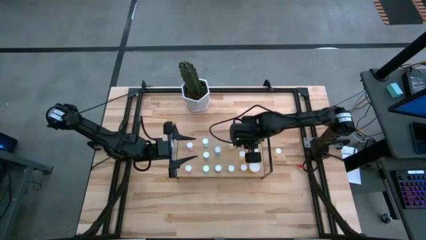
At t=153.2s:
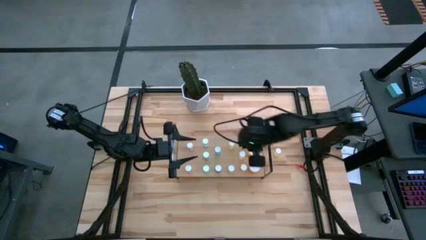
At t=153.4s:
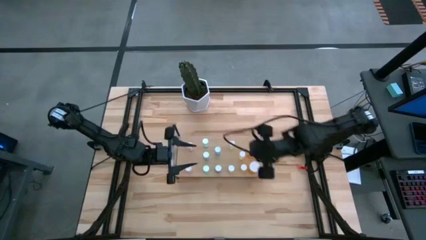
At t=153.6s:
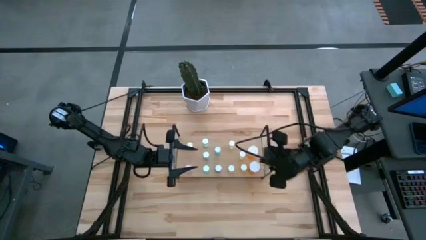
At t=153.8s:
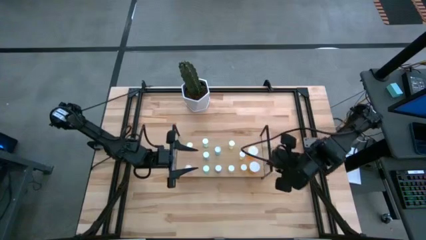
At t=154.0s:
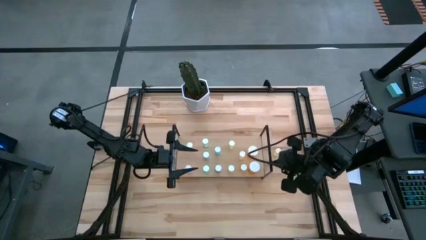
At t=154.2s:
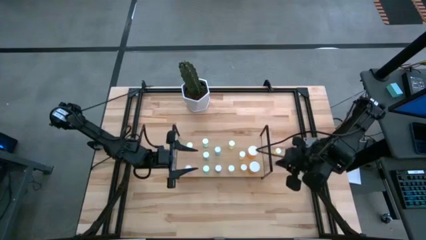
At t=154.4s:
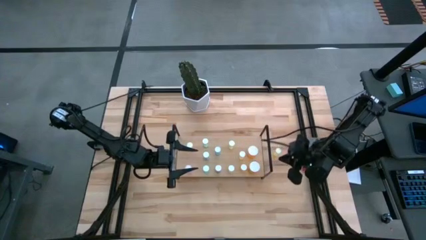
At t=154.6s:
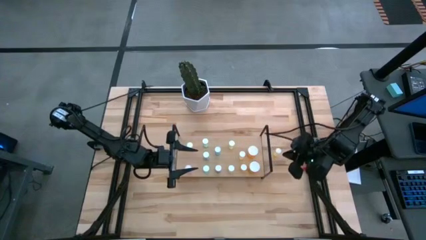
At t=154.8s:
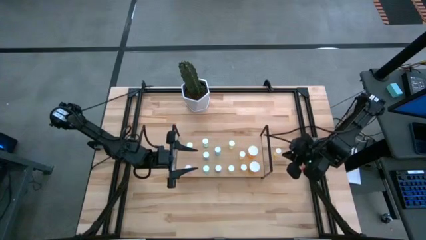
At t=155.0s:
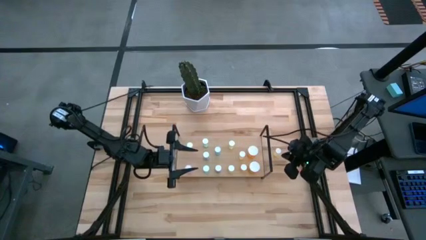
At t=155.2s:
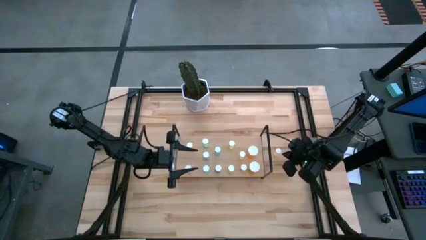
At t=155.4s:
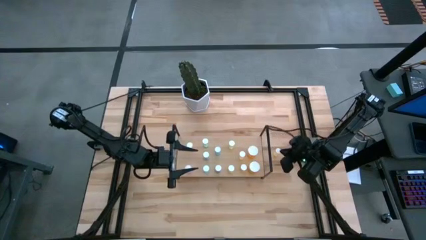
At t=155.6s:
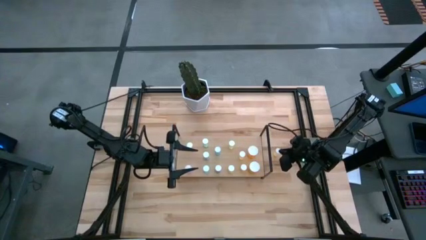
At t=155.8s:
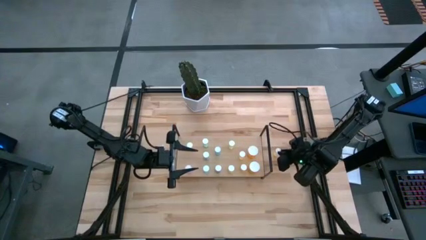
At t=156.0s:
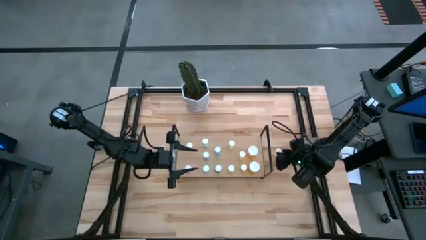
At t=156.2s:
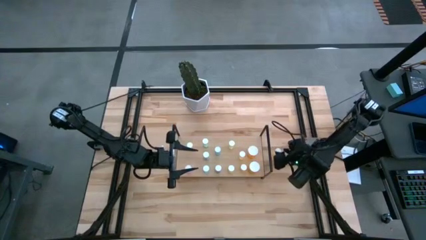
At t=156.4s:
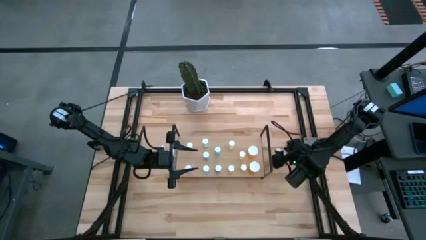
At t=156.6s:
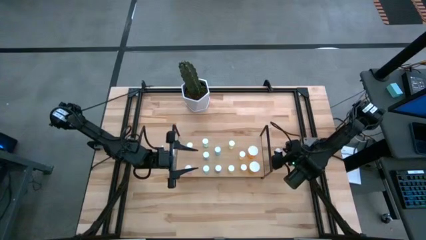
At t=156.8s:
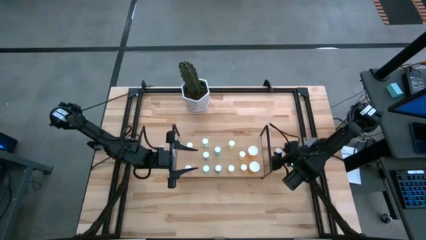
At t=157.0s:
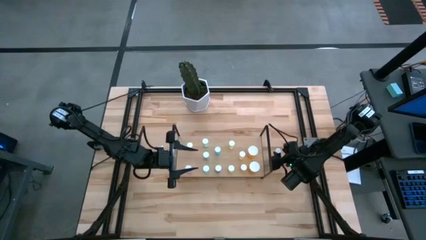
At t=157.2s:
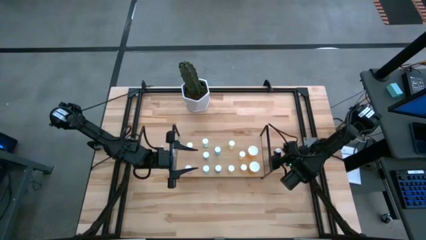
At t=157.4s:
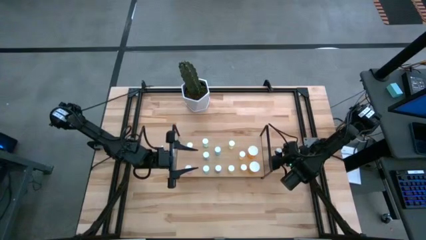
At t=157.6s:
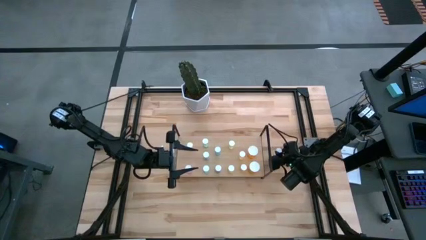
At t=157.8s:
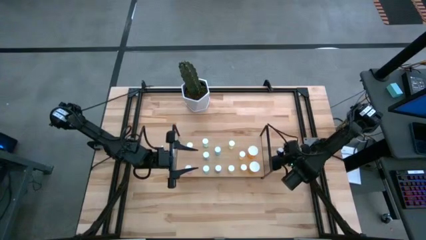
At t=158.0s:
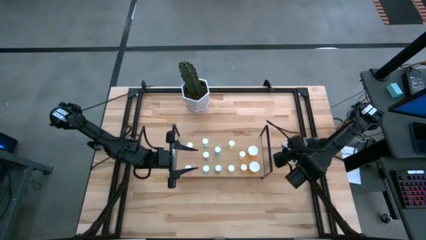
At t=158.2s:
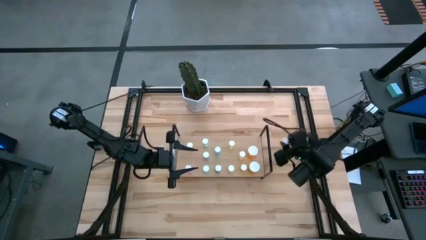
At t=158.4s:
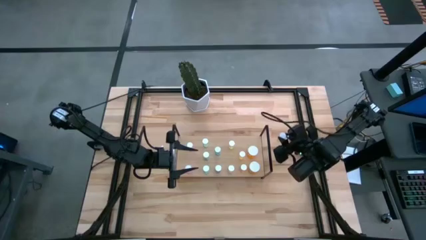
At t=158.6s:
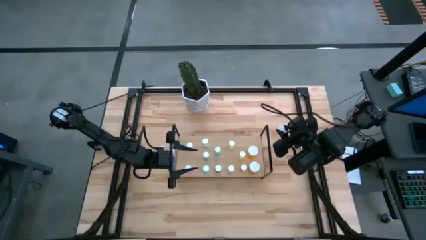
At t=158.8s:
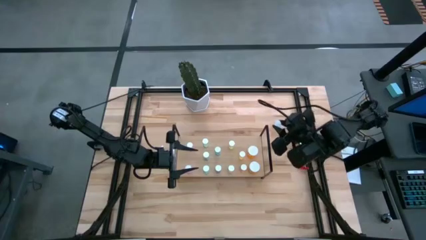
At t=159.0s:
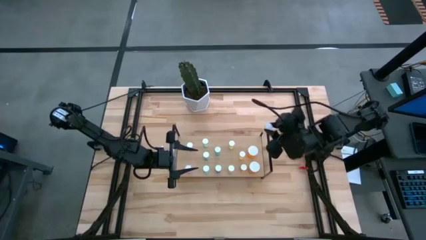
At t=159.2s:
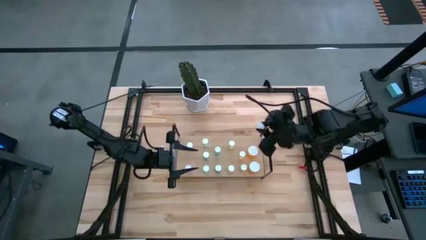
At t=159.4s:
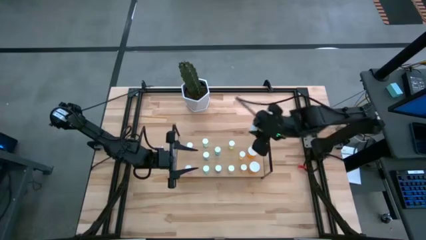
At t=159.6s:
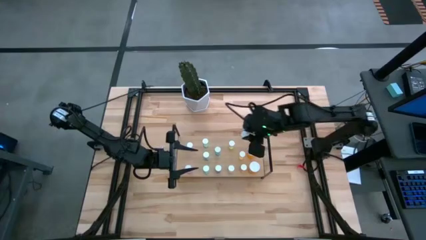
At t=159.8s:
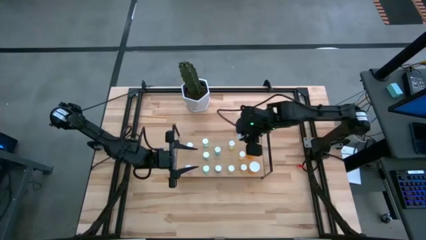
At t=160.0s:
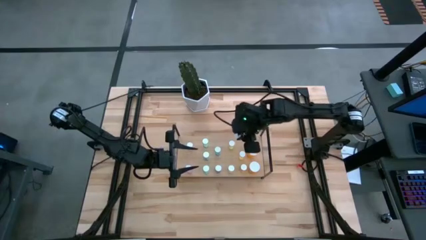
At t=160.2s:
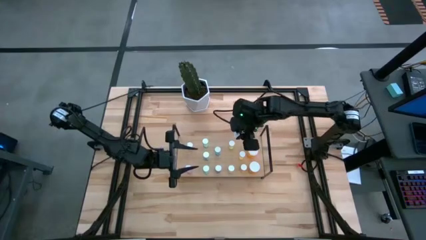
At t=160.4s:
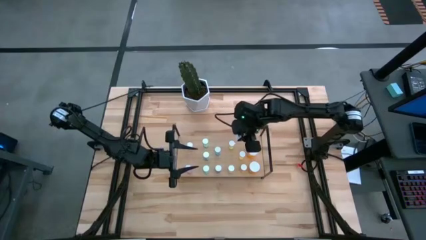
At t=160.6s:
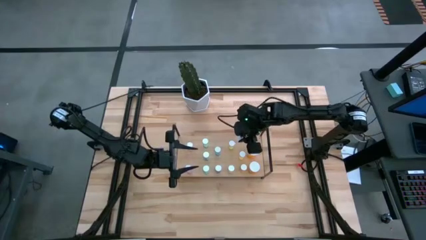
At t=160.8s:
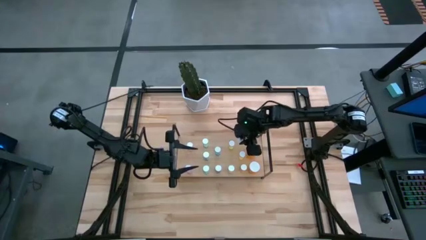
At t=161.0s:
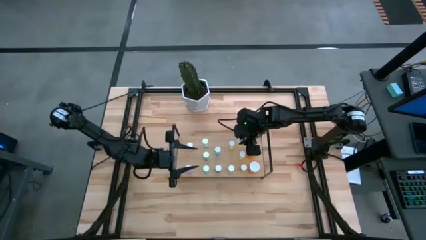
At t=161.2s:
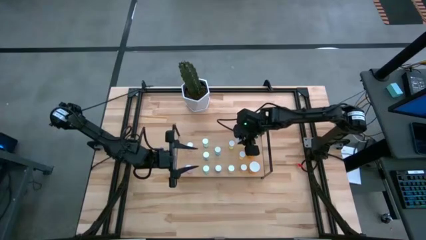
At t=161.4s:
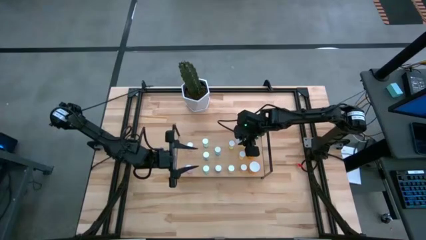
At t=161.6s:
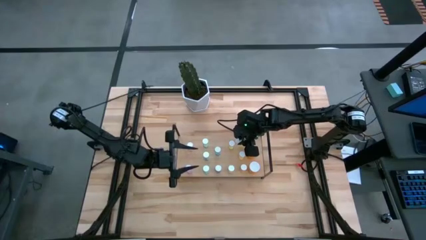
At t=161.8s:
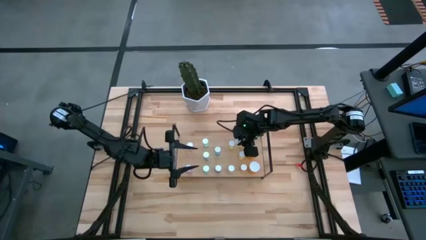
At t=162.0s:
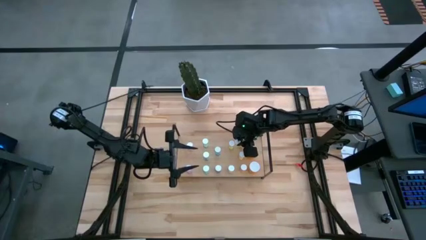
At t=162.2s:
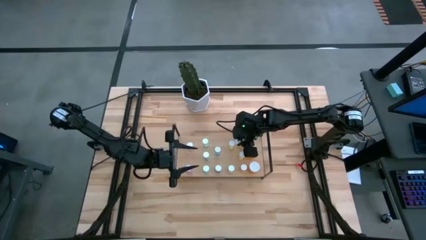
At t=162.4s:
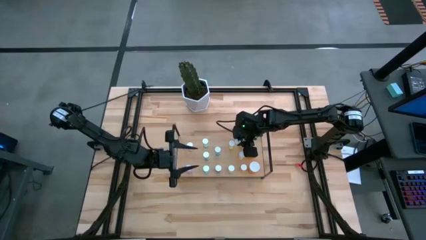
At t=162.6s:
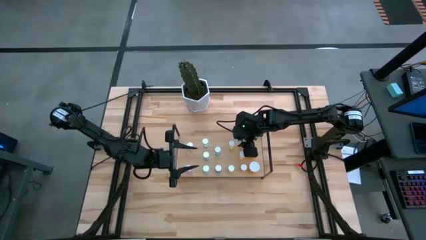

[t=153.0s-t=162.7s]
Task: Pick and place medicine bottles onto shelf by color
Put the yellow pill bottle on the shelf aligned with the other yellow pill bottles

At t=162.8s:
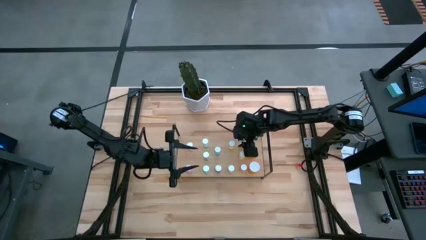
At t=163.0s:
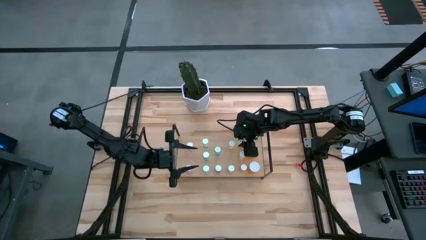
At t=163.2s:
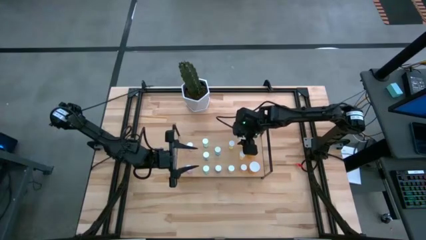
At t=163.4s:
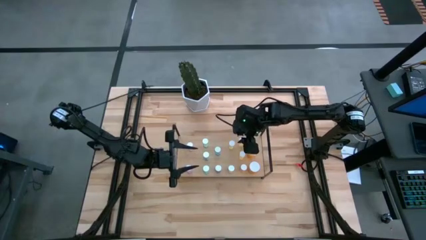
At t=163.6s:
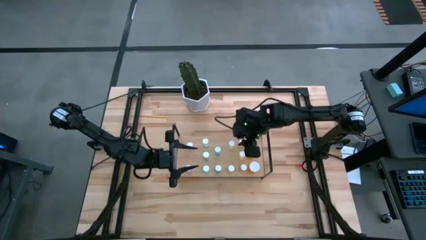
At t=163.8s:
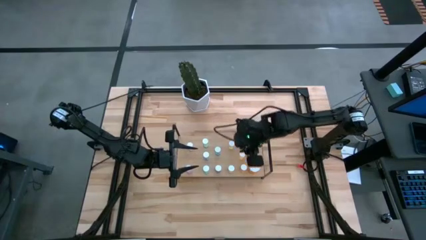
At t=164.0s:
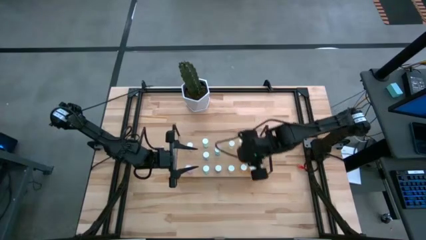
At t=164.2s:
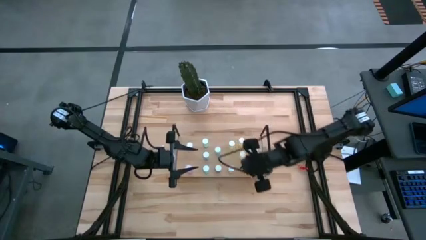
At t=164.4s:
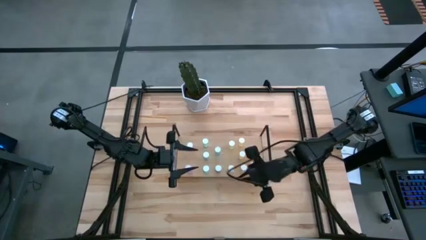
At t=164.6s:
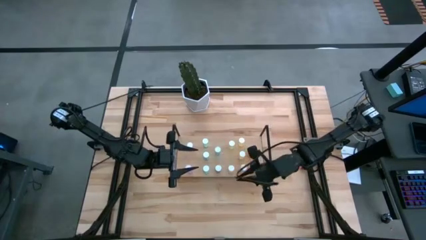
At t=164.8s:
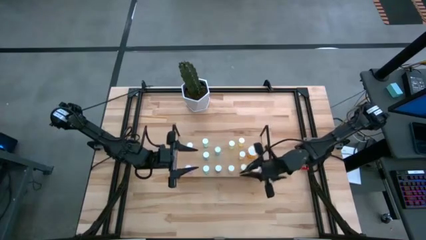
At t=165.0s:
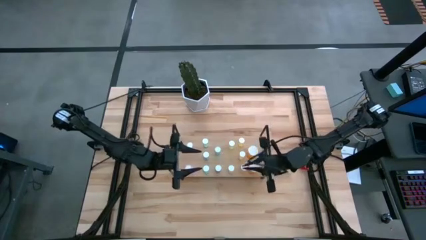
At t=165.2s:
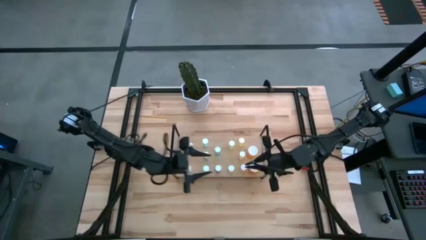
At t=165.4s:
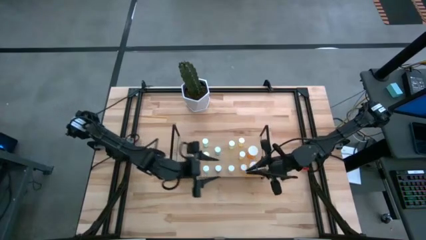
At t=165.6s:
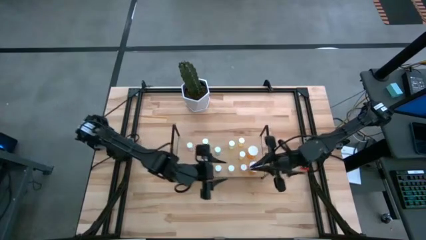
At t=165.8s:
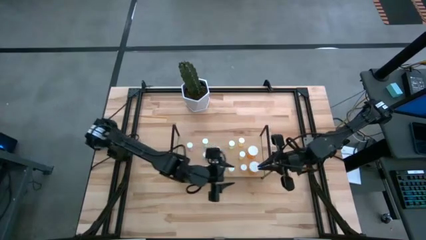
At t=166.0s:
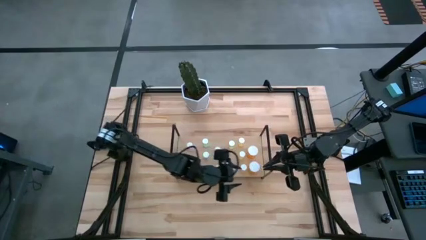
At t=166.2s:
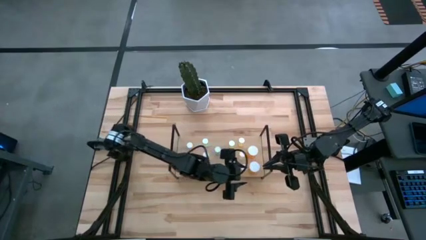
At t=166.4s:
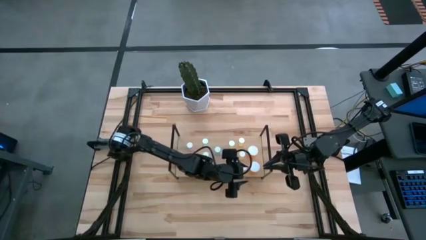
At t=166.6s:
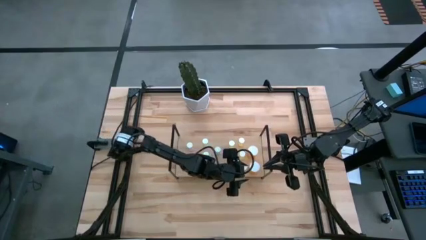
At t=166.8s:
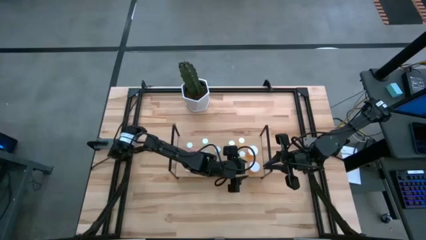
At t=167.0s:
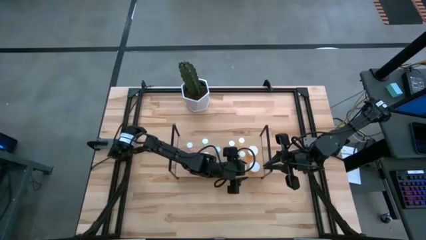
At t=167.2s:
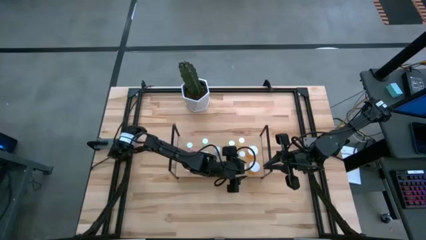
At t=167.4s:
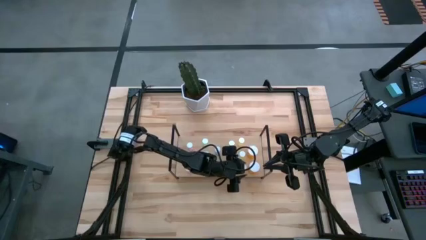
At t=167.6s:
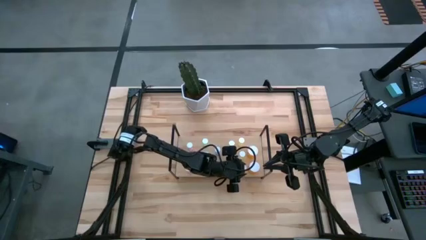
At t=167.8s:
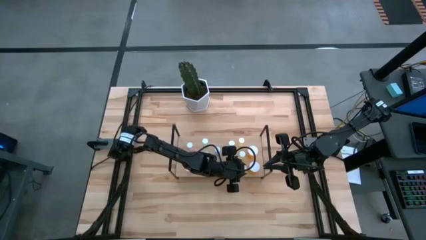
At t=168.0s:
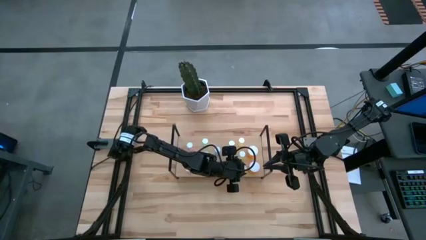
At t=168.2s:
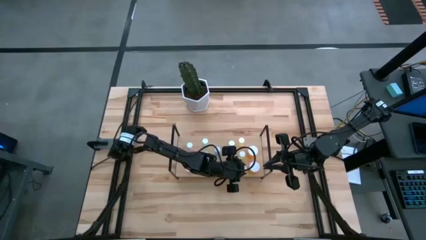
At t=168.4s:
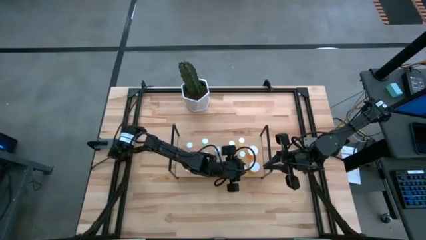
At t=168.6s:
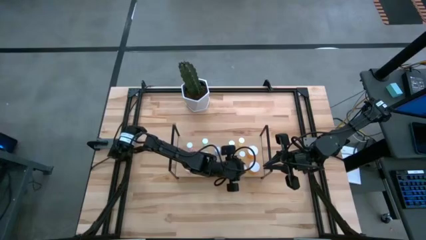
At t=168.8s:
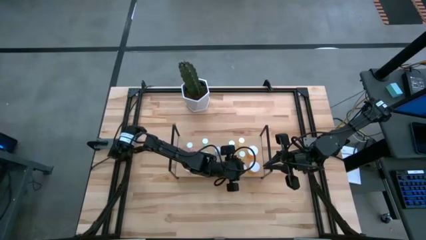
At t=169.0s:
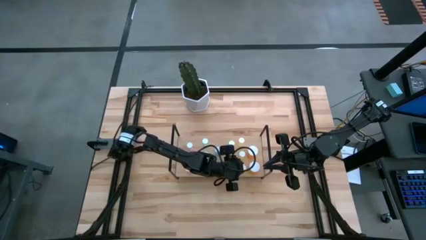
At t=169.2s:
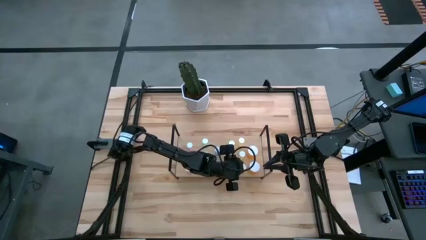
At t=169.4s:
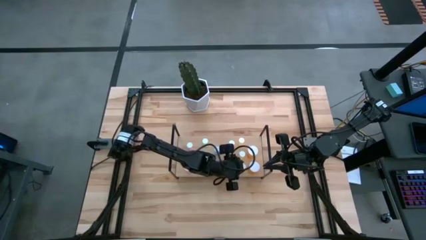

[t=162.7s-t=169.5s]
Adjust the yellow pill bottle on the shelf
